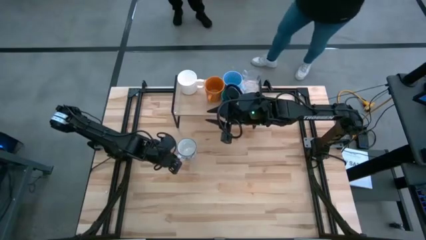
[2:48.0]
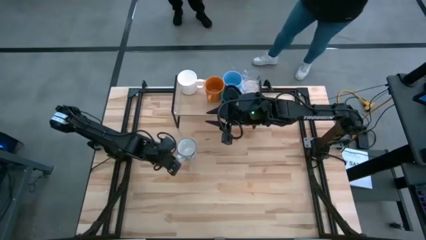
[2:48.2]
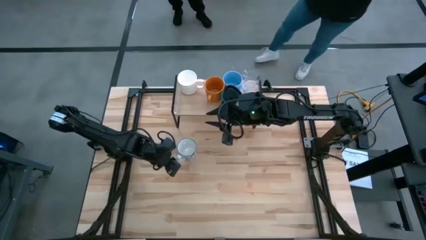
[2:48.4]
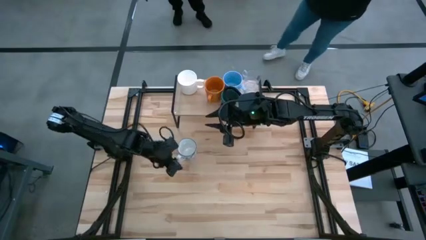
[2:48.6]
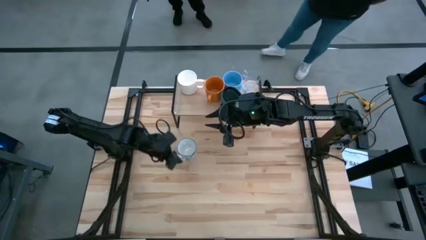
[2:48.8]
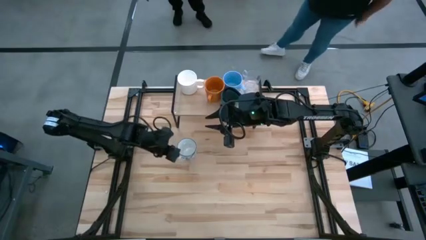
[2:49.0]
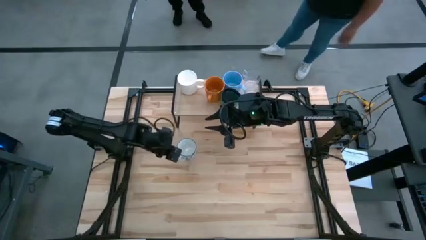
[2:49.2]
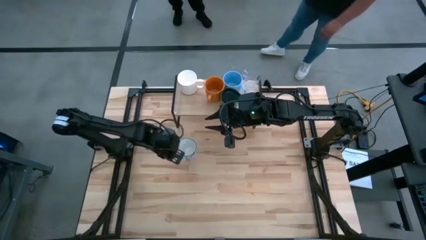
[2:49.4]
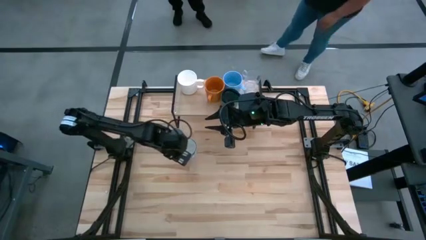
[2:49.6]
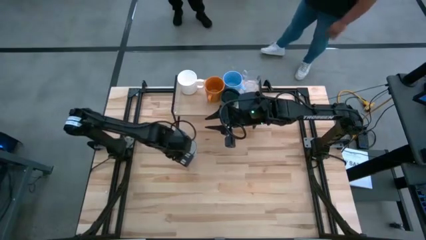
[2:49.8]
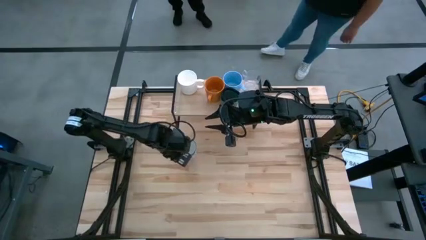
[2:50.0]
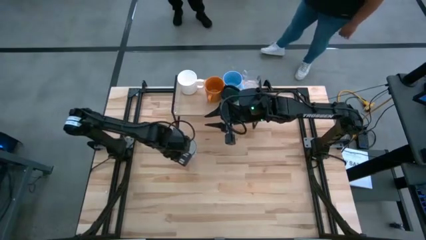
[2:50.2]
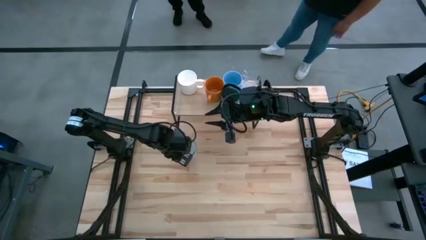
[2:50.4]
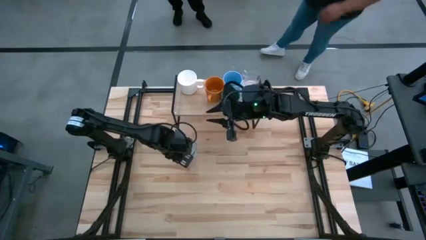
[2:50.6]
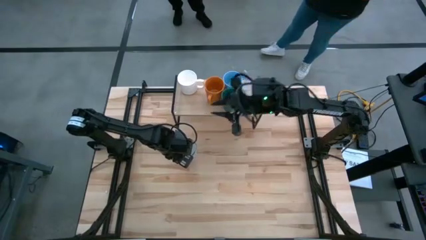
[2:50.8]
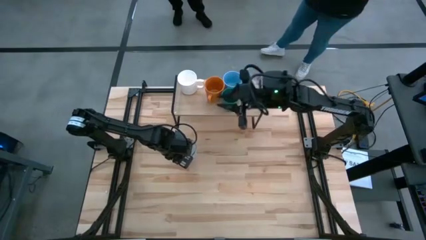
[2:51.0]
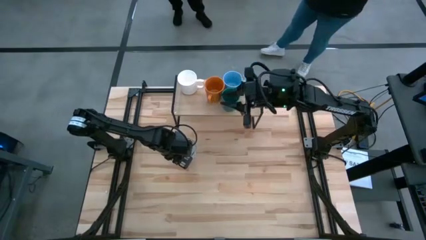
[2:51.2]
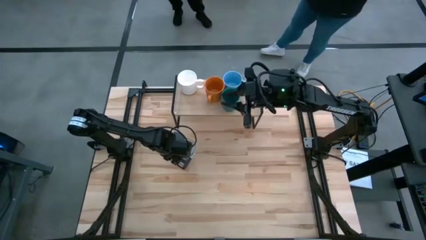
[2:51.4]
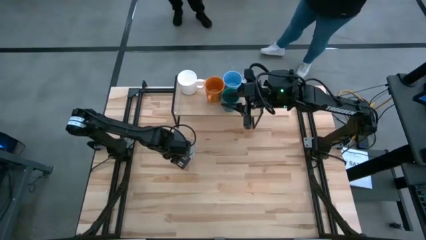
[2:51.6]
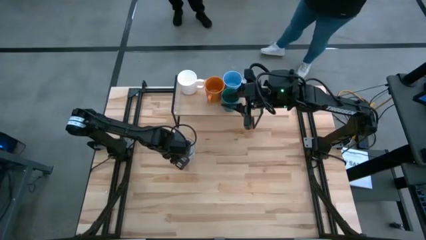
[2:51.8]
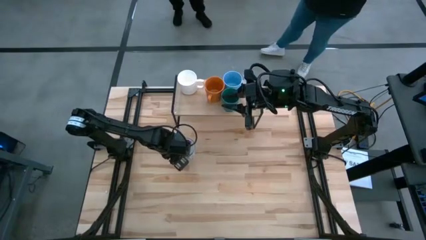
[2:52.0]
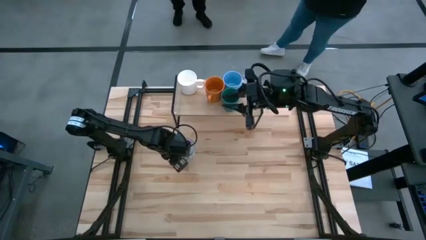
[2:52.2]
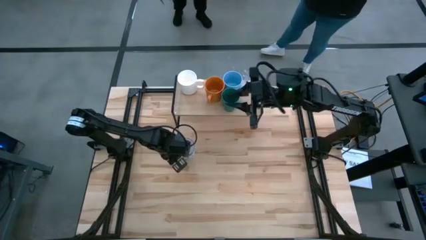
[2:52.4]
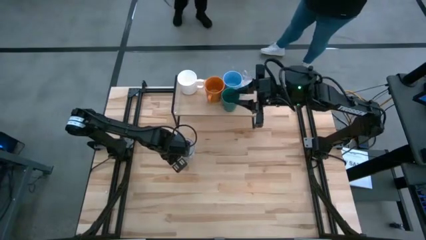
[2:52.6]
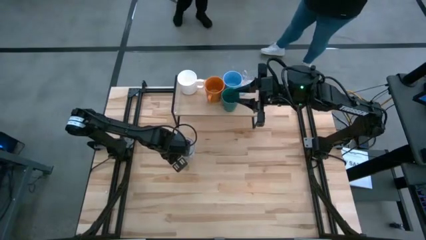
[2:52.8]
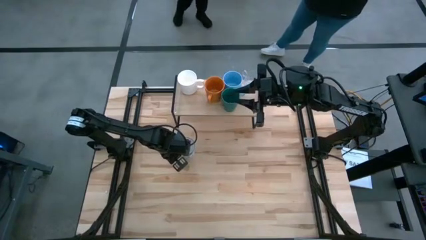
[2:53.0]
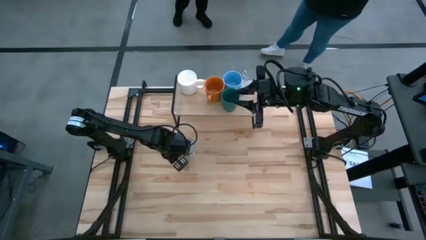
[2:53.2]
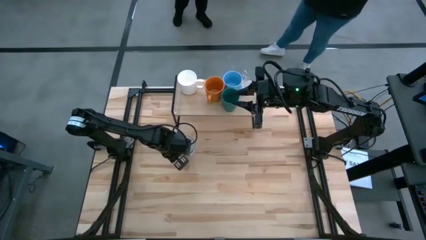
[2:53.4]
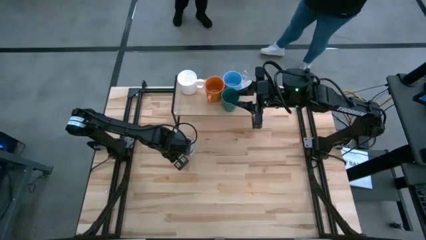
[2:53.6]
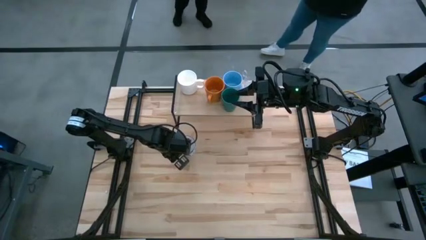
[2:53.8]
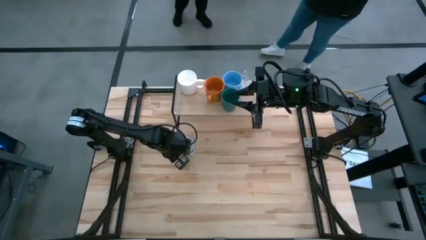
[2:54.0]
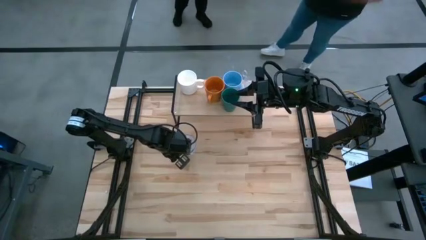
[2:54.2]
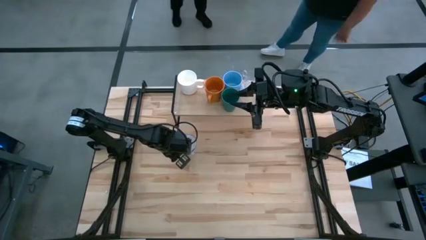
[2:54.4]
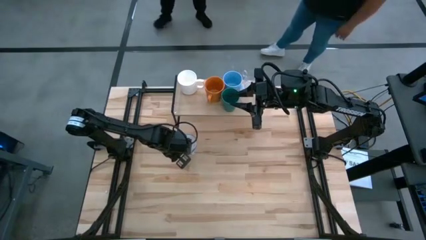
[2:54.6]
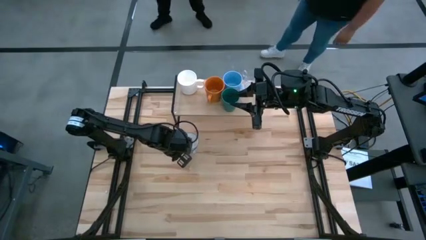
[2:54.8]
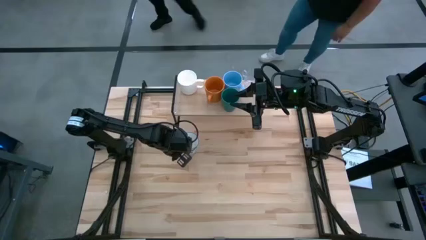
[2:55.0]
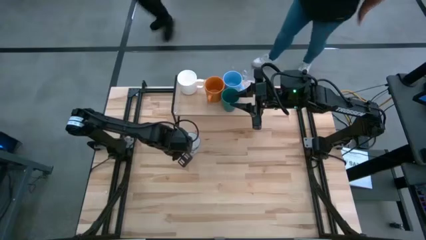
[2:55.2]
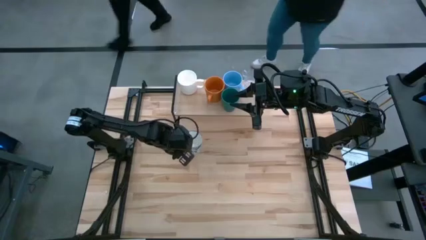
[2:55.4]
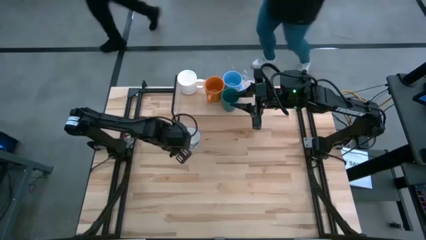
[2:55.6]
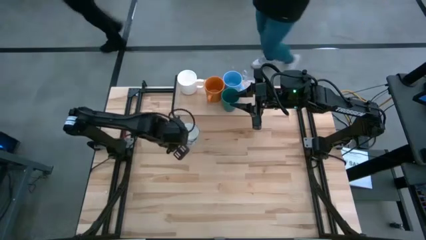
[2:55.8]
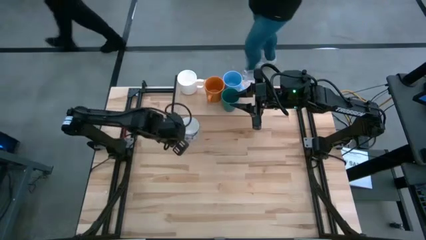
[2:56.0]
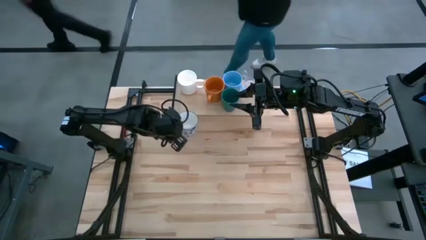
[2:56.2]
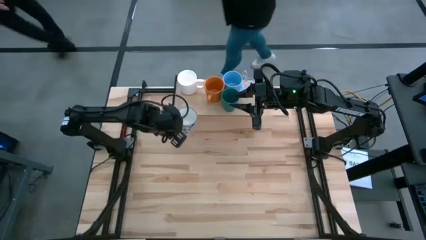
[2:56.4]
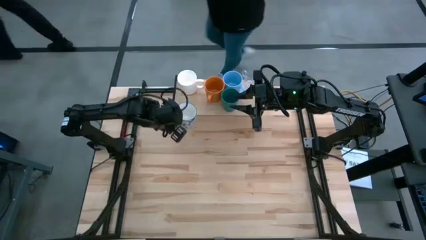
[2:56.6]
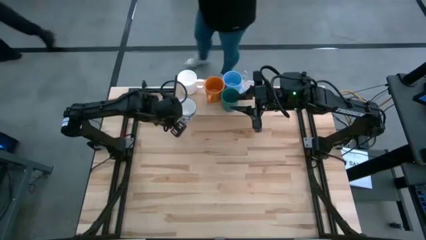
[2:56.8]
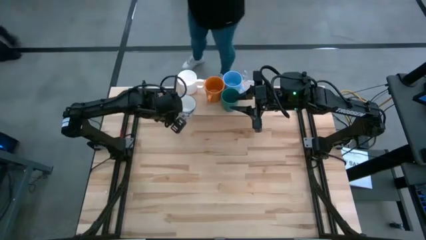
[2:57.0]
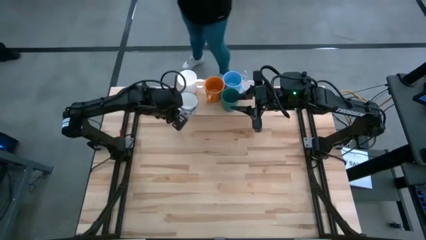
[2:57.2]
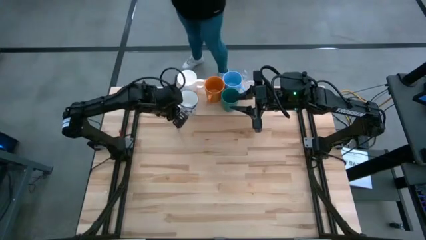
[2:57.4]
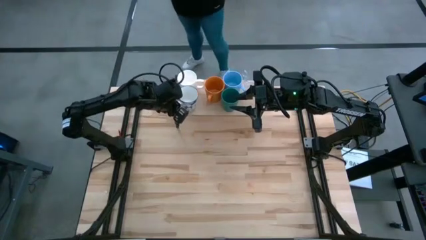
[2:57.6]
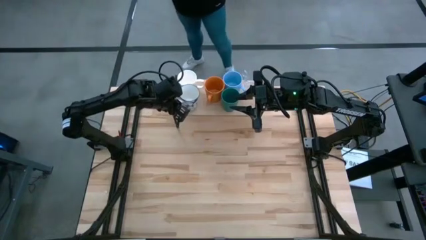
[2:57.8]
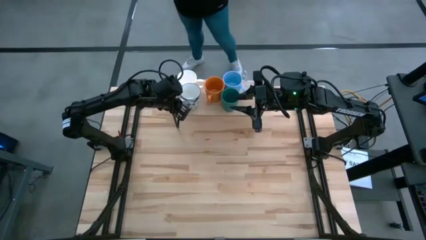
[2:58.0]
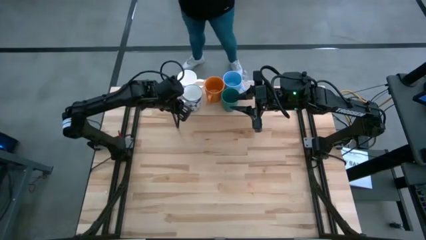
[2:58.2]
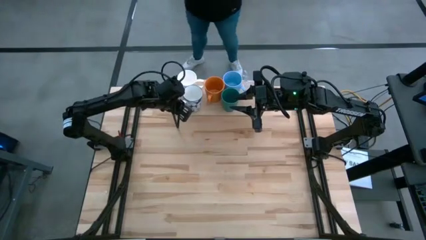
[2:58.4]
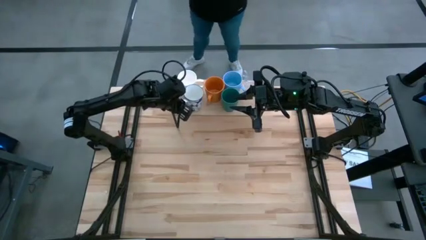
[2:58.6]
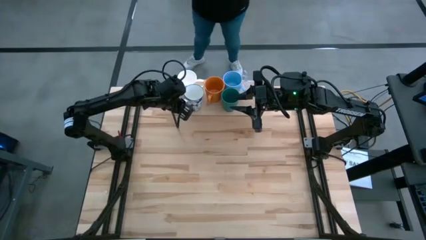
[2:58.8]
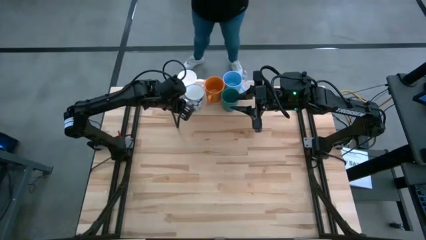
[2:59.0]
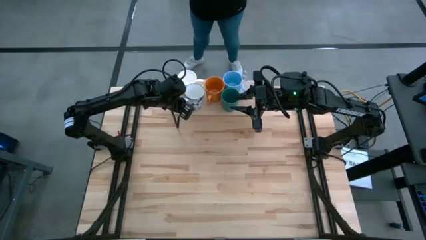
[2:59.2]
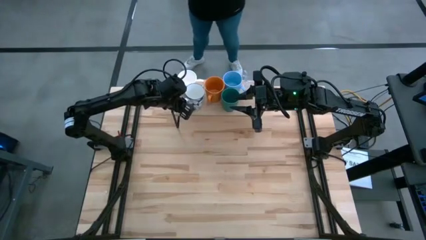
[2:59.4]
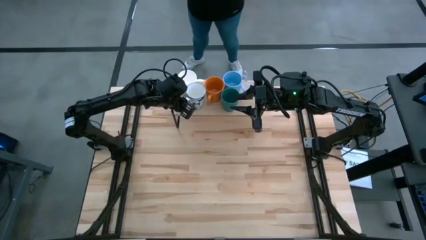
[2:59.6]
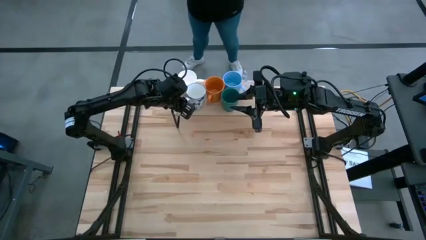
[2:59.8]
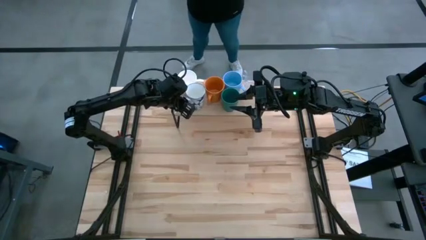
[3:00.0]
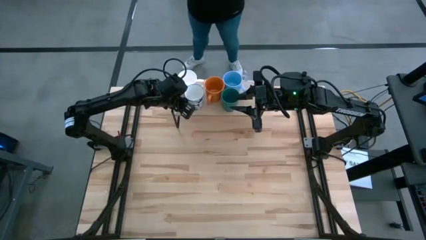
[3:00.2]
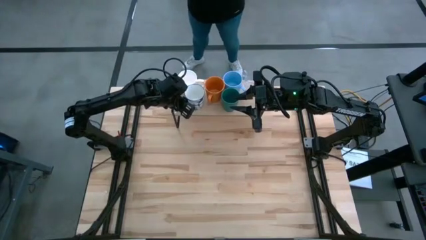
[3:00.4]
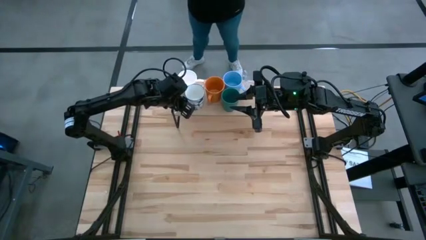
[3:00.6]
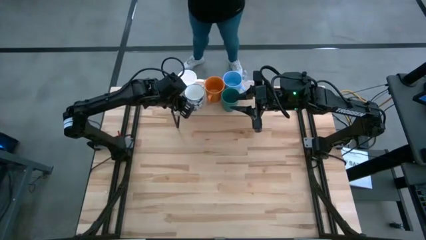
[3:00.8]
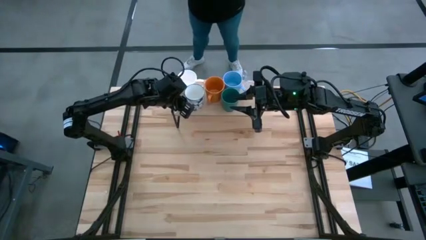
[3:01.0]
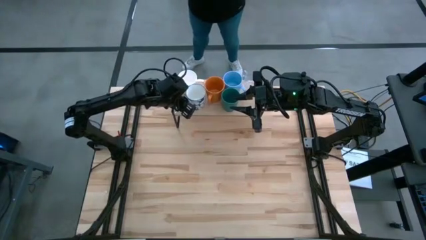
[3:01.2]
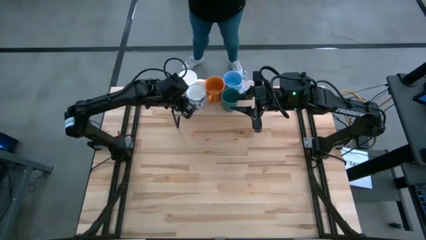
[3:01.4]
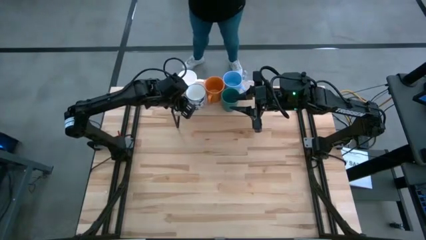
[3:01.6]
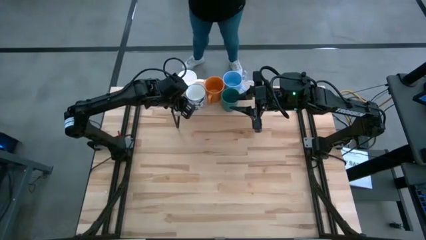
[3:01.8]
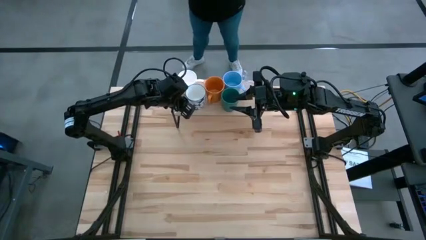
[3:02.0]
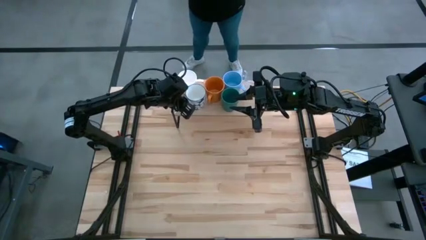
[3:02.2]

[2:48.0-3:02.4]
Task: Stack small to large cups/mugs on shelf
Put the white patterned mug on the shelf

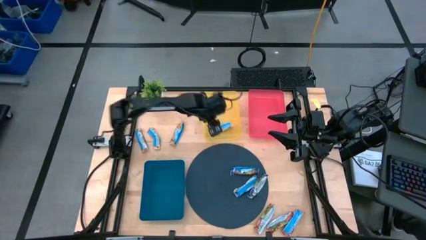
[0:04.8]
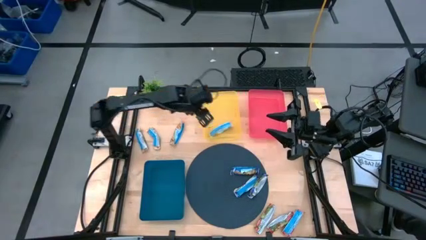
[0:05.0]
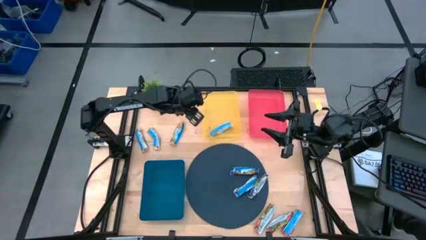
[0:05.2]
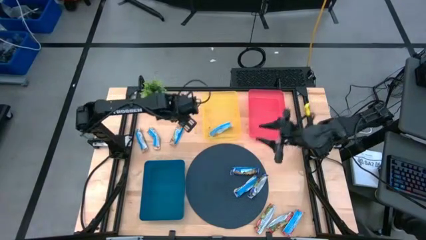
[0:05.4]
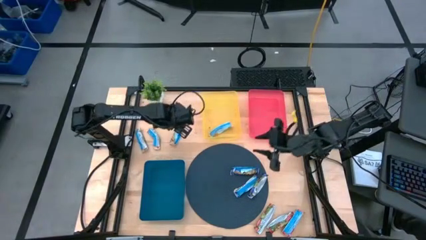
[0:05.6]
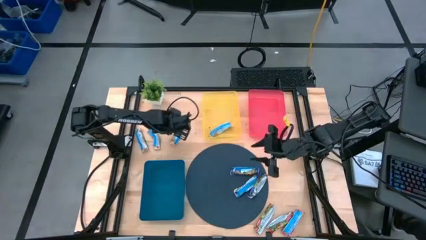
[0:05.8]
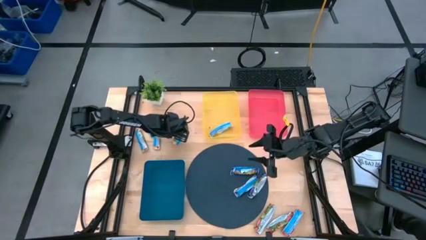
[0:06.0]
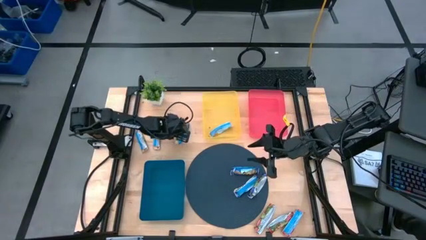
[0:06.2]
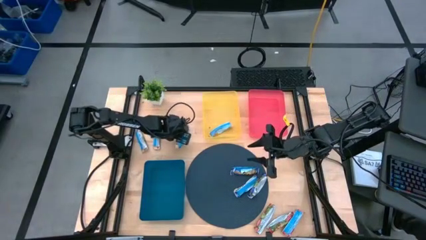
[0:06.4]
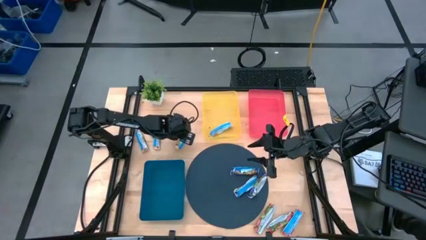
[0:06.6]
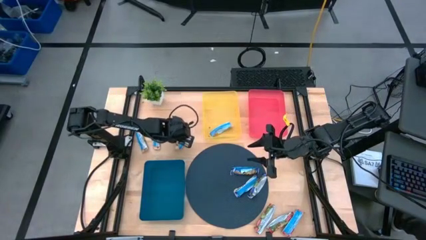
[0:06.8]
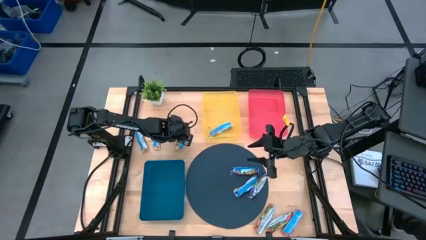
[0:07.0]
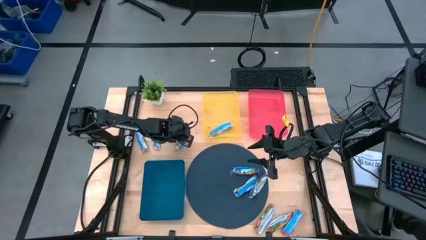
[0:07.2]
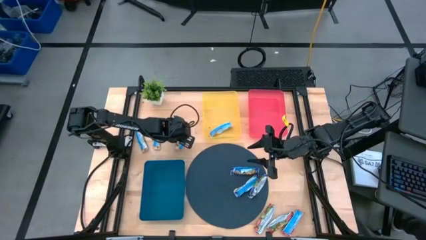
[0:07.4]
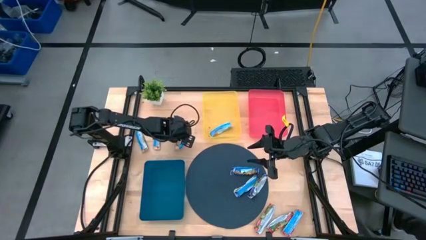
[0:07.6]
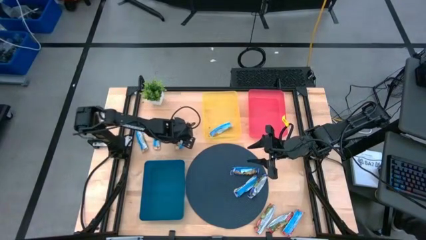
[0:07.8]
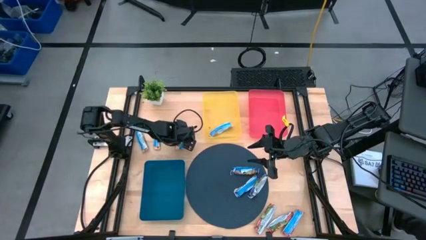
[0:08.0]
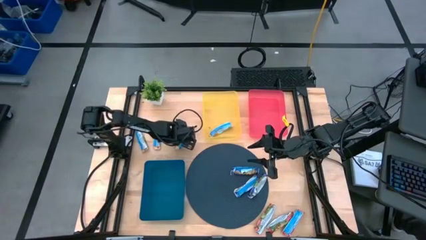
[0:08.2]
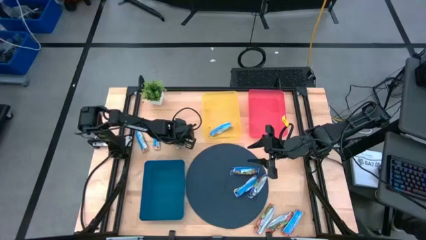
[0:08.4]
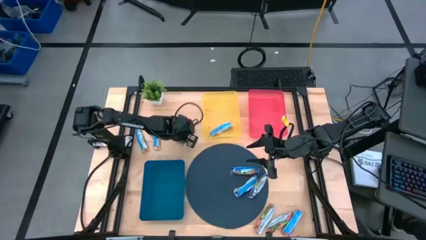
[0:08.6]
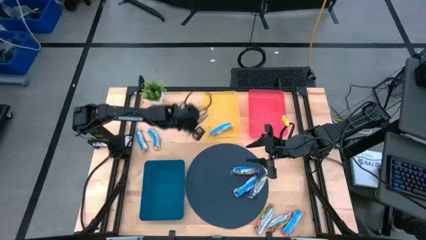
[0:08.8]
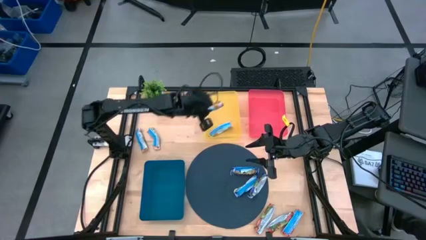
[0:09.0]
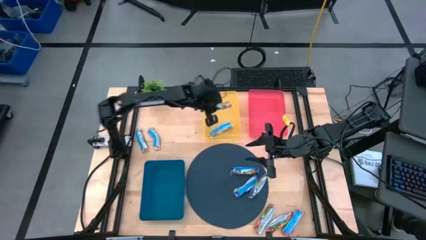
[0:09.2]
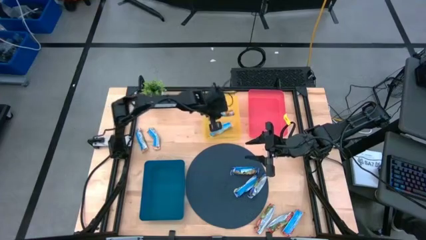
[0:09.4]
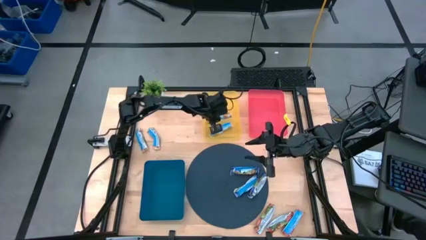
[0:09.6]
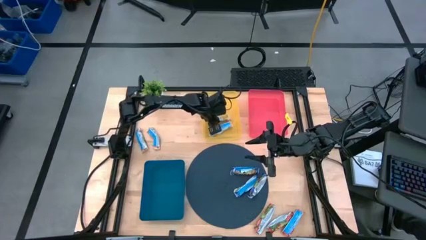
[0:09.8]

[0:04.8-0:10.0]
Task: Pick and place Granola Bars by type
Put the yellow granola bar into the yellow bin
